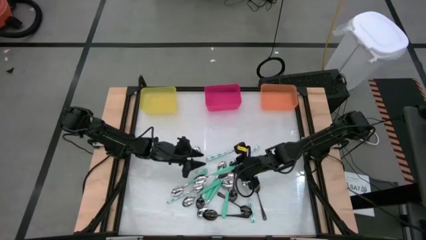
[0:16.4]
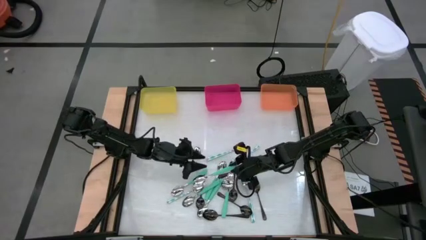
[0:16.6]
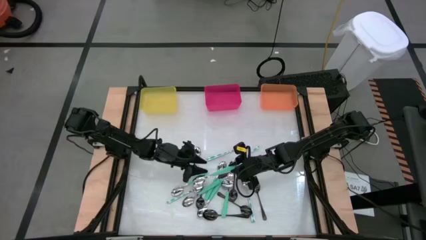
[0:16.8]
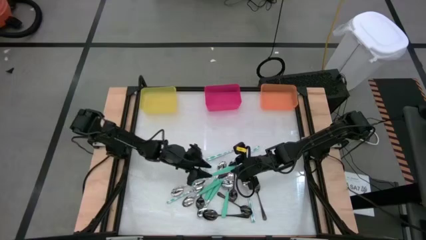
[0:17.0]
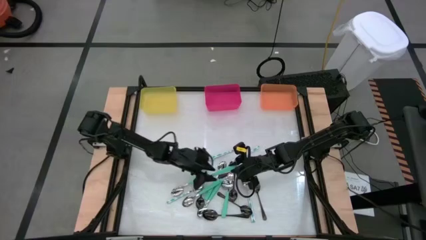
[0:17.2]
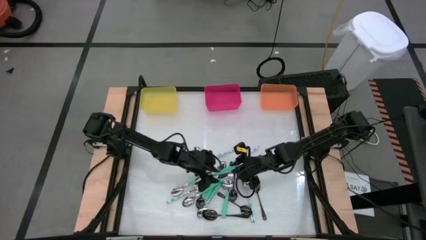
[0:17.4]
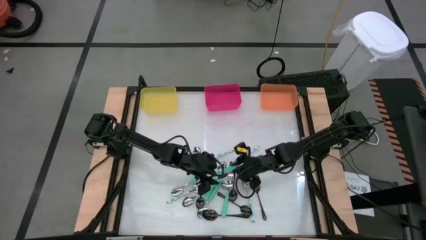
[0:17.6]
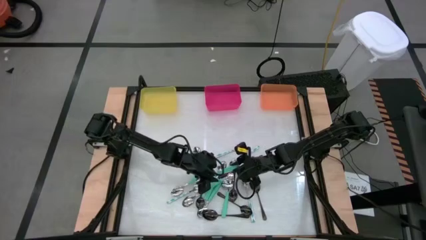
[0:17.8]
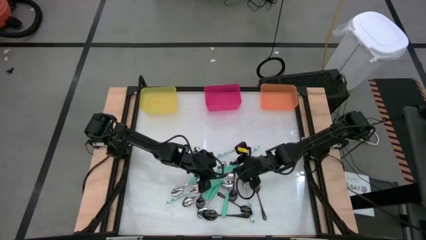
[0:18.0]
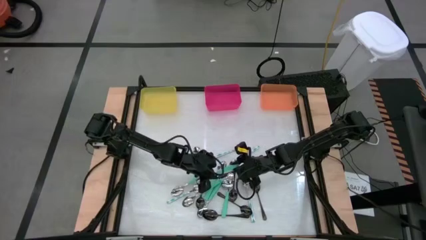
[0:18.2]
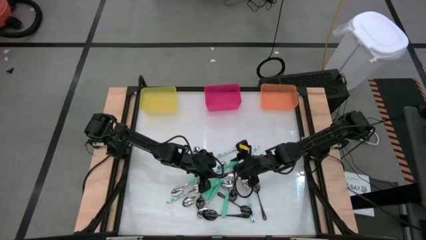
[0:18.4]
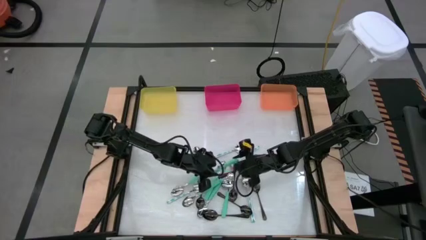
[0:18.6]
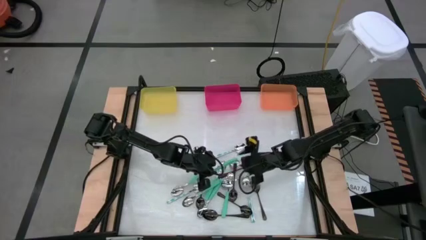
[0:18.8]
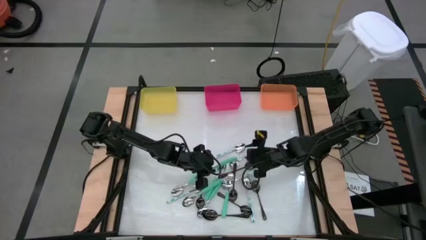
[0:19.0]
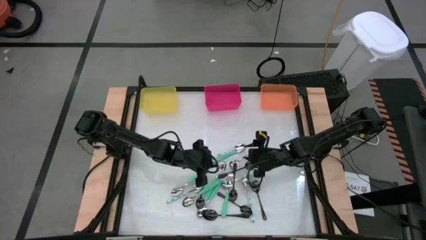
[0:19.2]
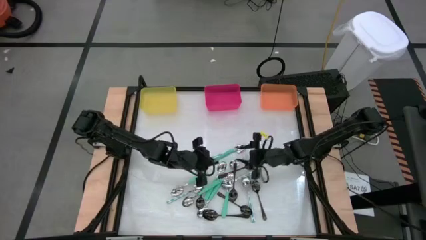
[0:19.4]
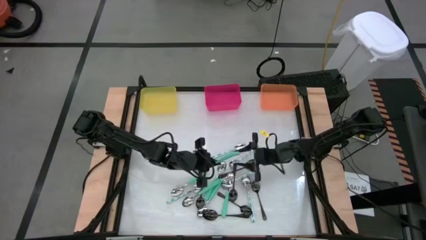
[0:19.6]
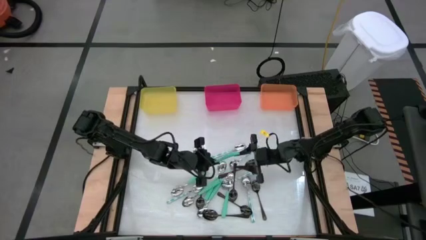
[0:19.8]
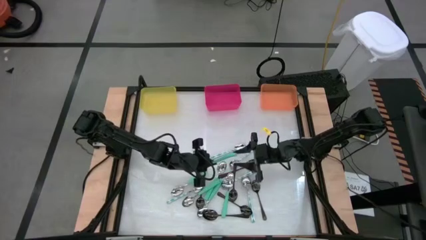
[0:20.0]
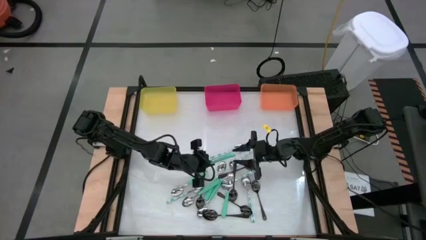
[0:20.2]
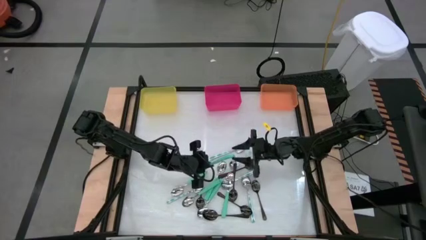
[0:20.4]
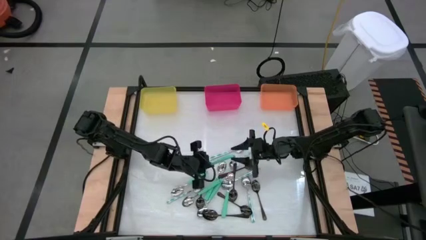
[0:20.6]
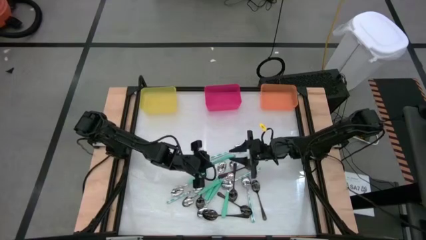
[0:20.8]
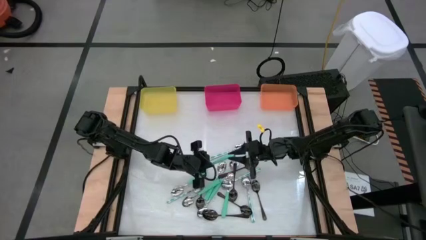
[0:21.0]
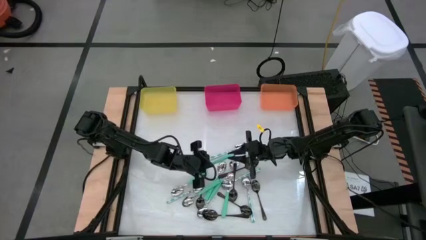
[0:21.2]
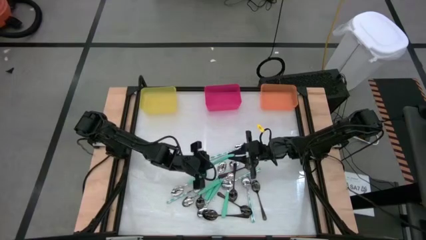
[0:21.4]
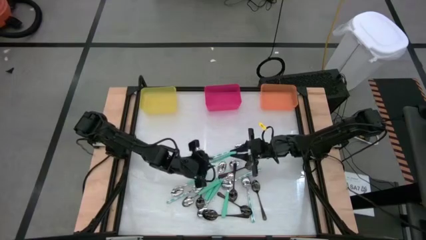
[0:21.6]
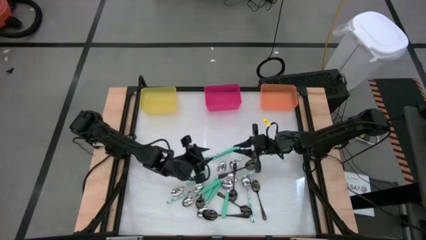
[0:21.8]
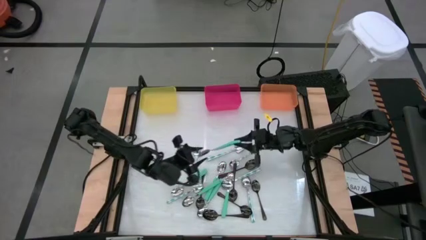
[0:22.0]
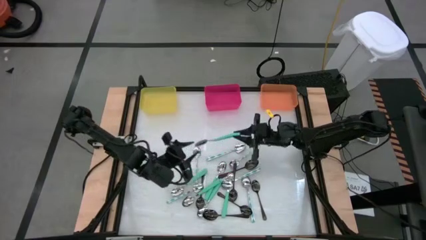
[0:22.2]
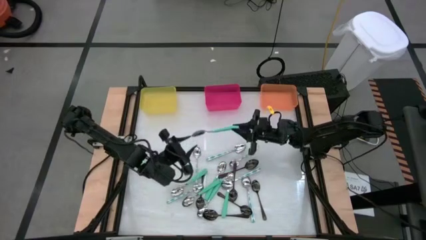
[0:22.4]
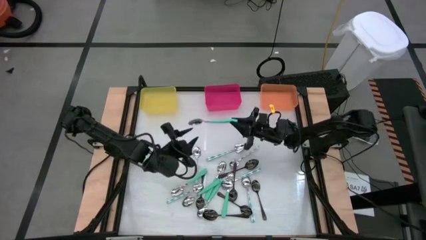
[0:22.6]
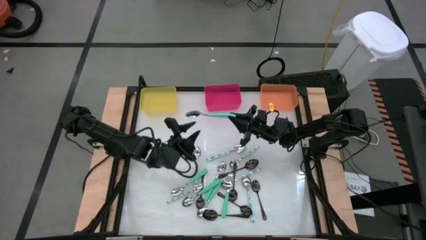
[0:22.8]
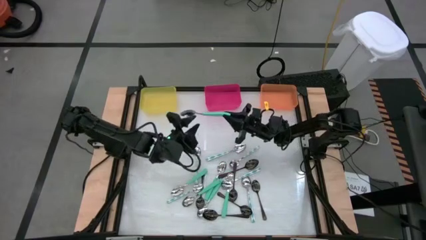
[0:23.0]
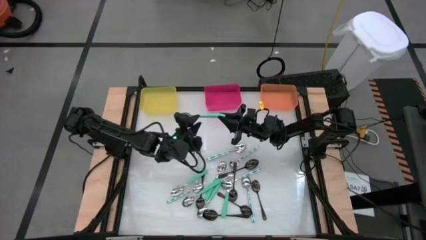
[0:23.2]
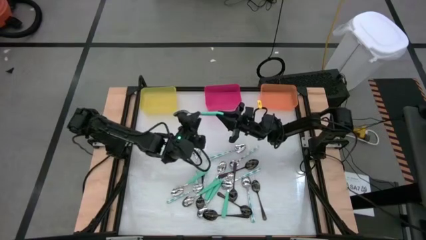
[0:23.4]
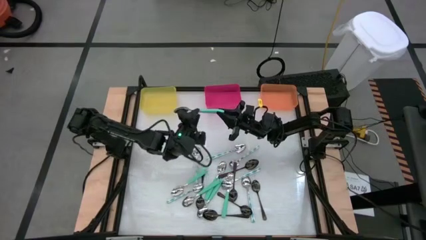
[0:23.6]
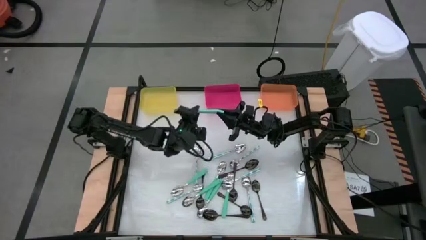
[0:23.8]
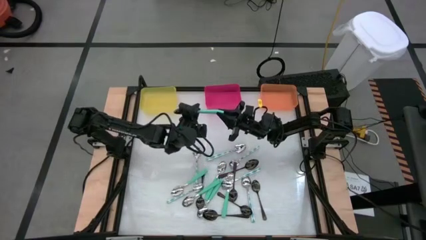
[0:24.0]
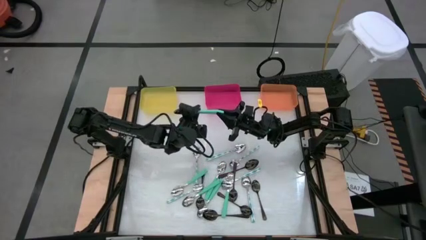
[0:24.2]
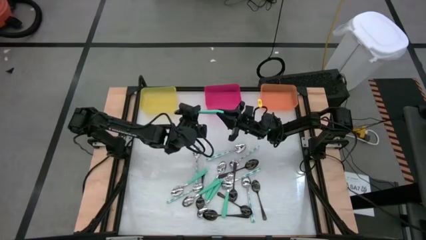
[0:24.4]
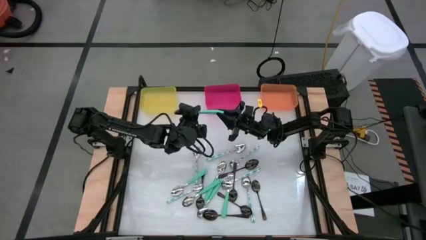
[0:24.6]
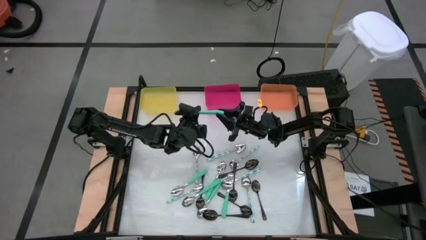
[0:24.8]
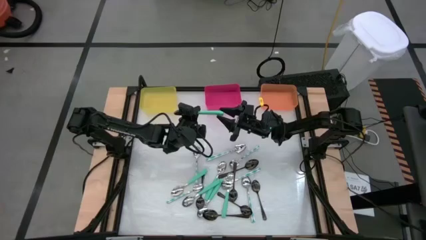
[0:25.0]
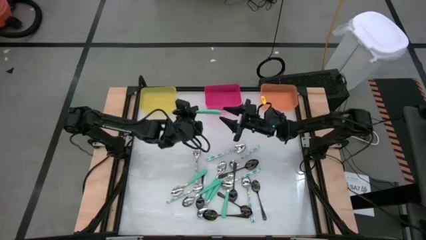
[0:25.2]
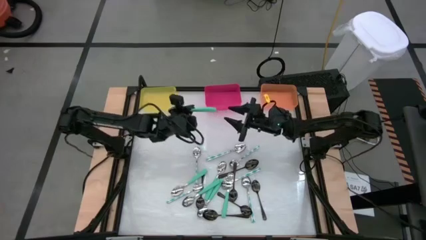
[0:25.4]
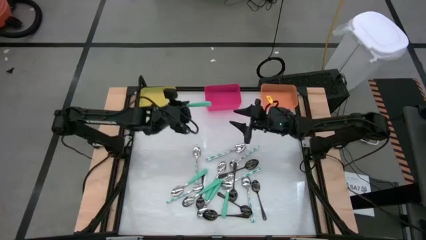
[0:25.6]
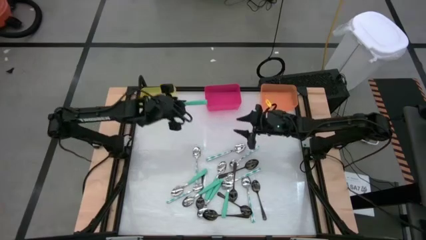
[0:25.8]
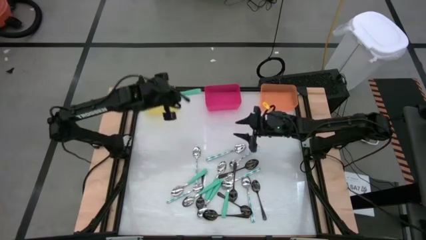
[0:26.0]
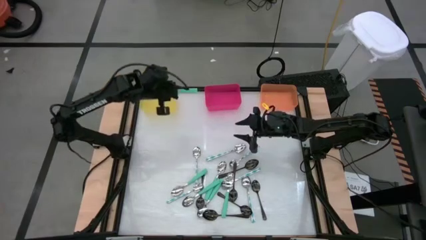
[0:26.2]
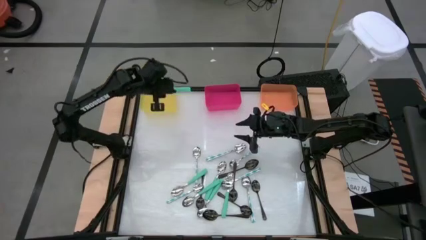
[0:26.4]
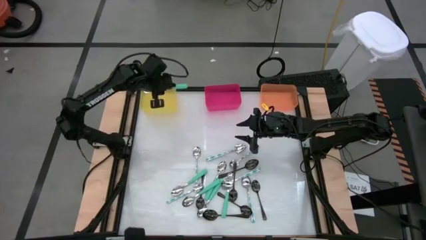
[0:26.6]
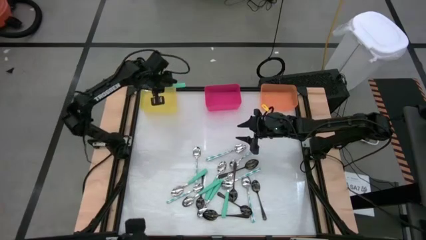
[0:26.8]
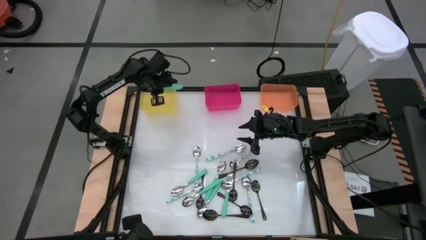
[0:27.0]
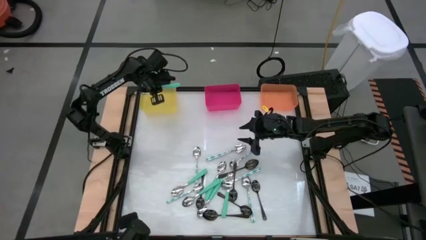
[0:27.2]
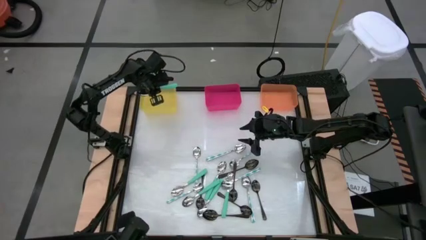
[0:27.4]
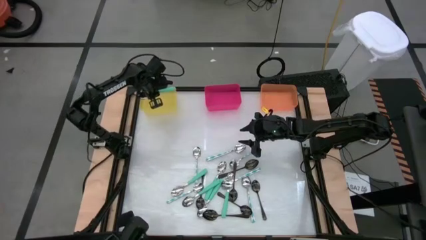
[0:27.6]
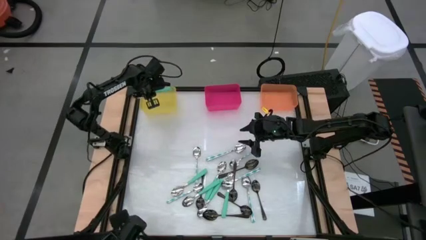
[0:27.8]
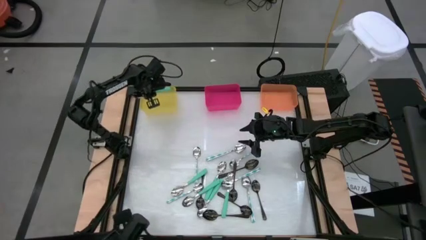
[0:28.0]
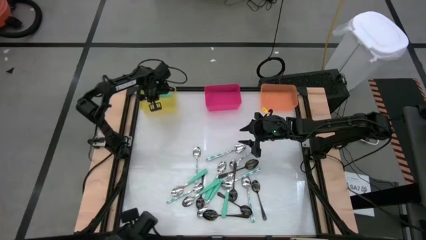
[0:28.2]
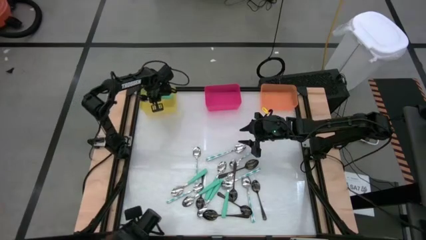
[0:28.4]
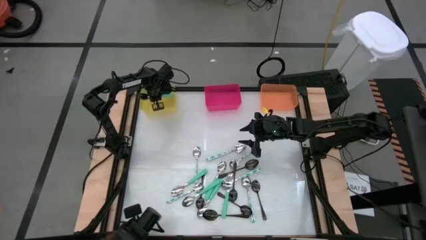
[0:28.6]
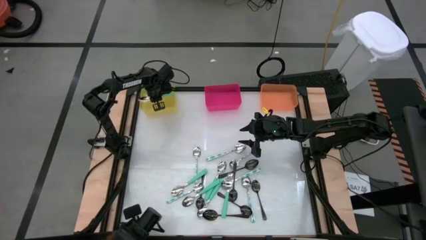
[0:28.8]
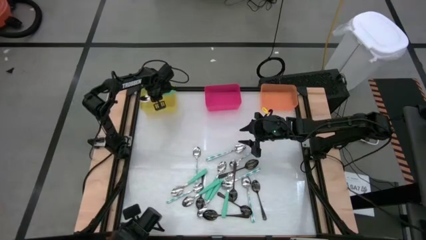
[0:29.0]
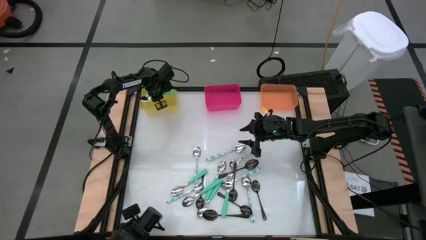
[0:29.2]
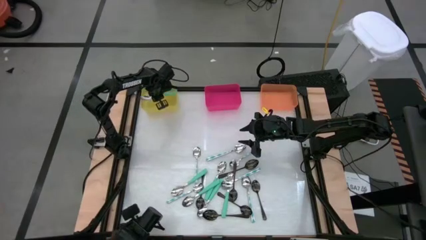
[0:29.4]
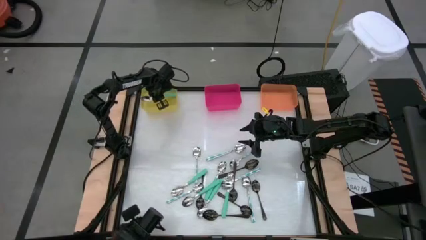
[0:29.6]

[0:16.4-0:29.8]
Task: Sort silverware by color (type)
Put the light green spoon into the yellow bin
